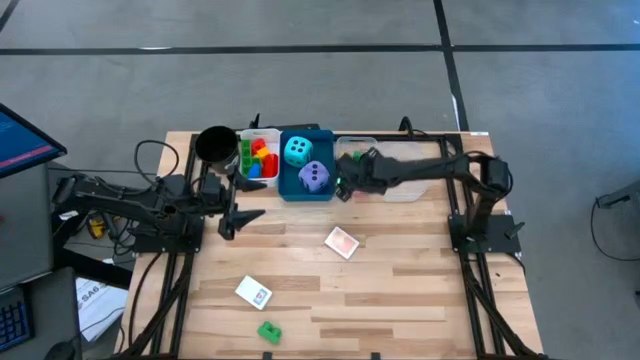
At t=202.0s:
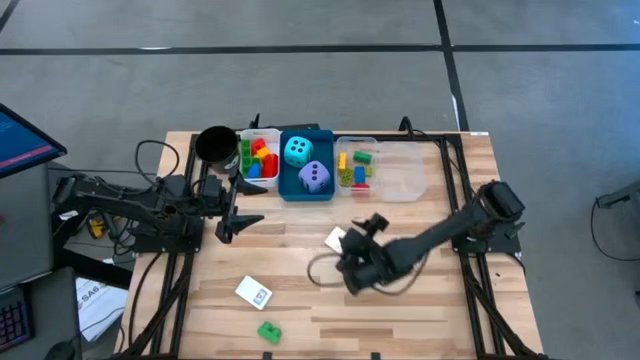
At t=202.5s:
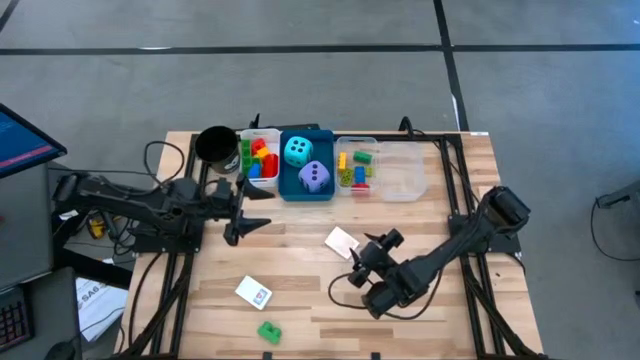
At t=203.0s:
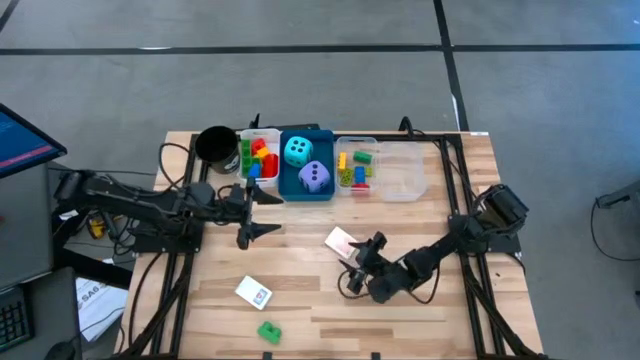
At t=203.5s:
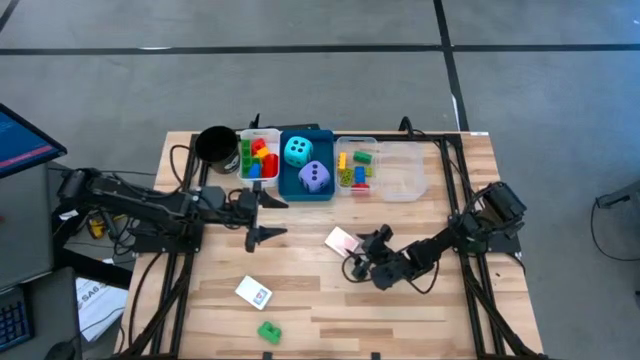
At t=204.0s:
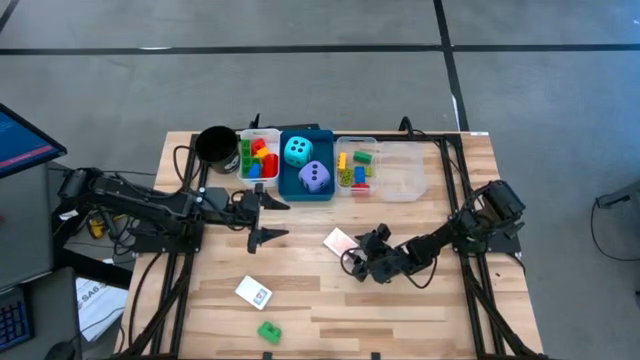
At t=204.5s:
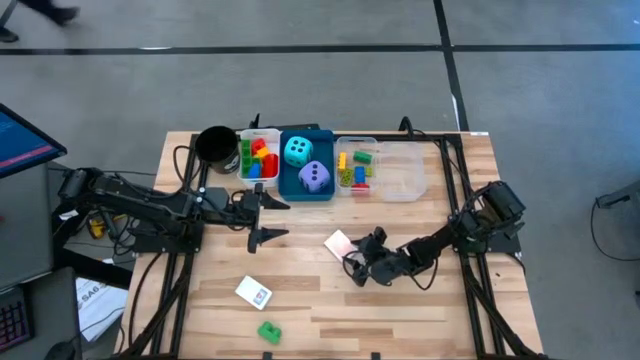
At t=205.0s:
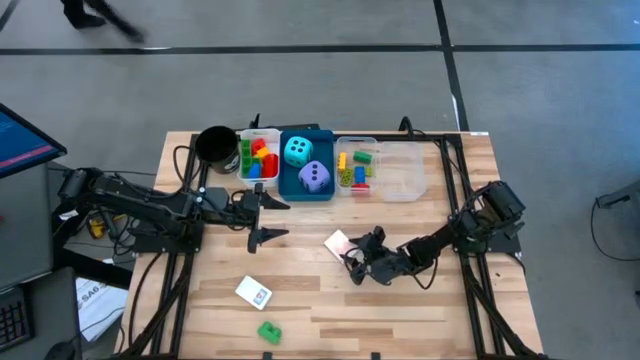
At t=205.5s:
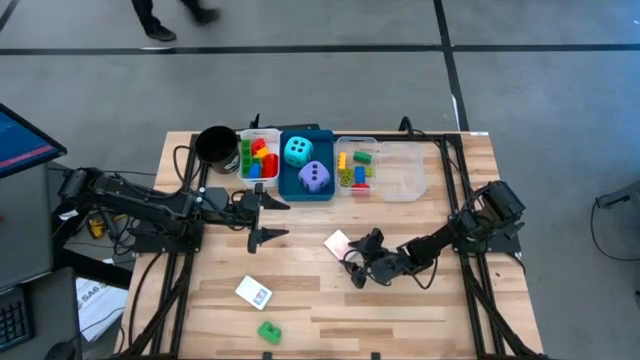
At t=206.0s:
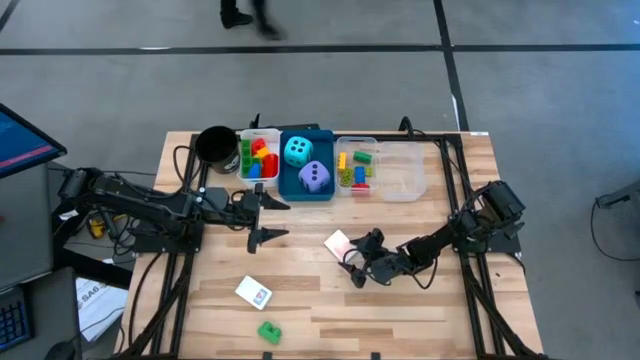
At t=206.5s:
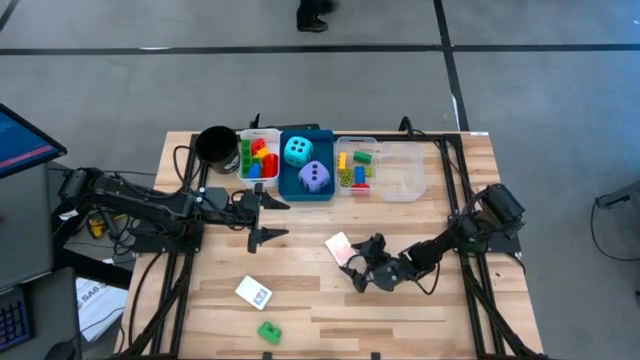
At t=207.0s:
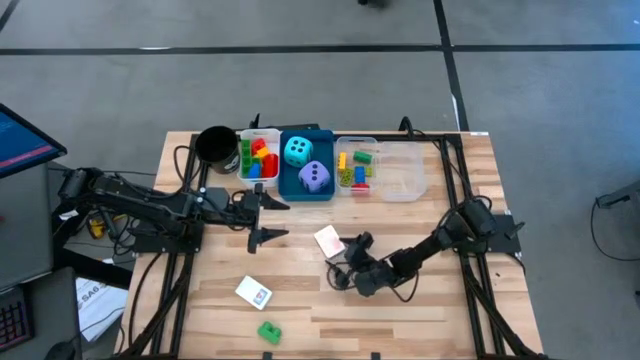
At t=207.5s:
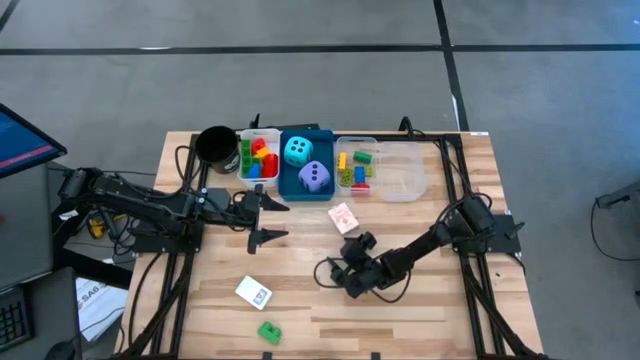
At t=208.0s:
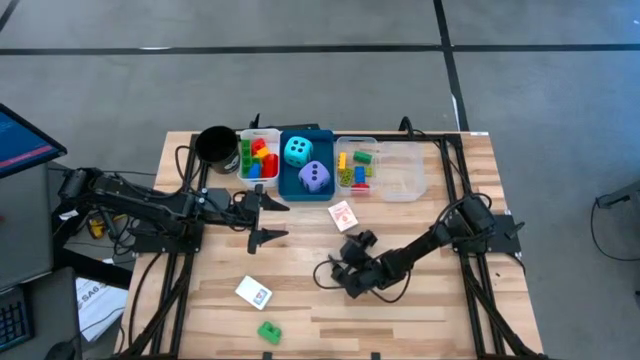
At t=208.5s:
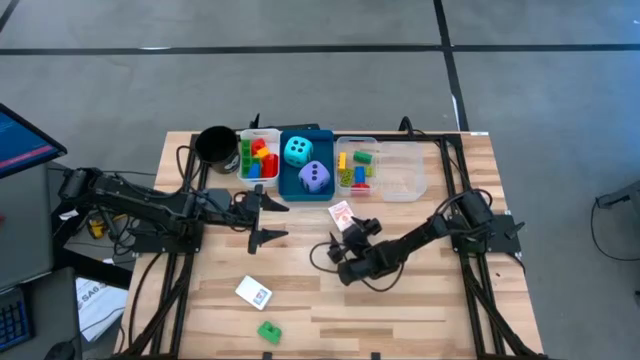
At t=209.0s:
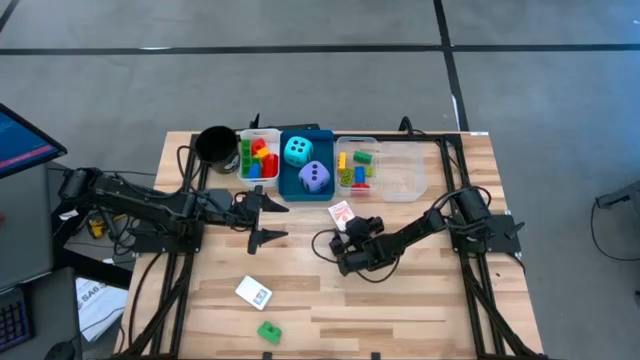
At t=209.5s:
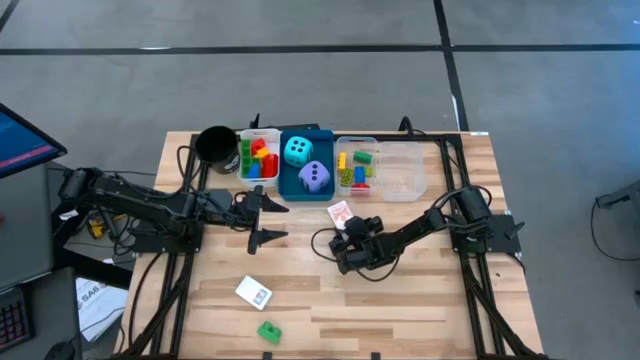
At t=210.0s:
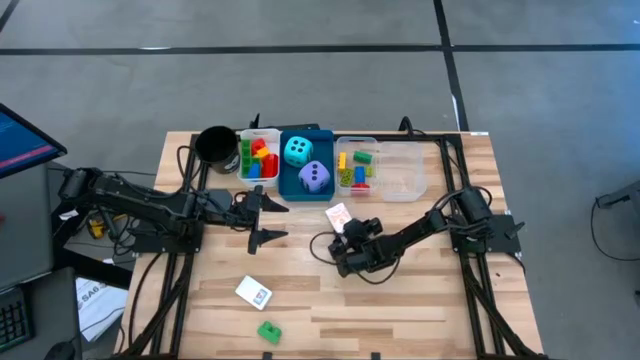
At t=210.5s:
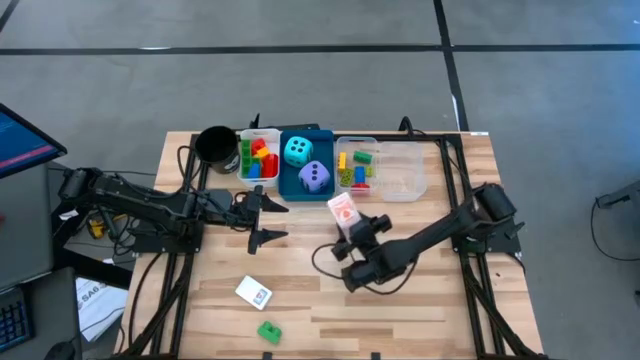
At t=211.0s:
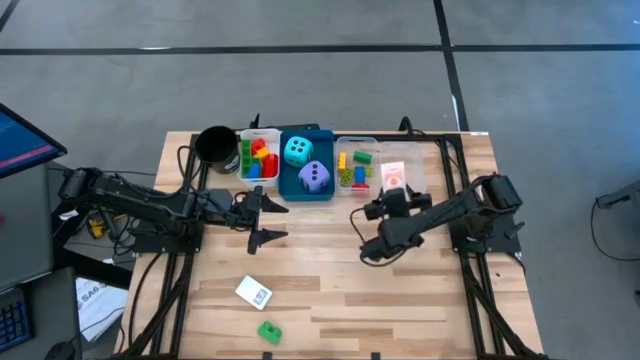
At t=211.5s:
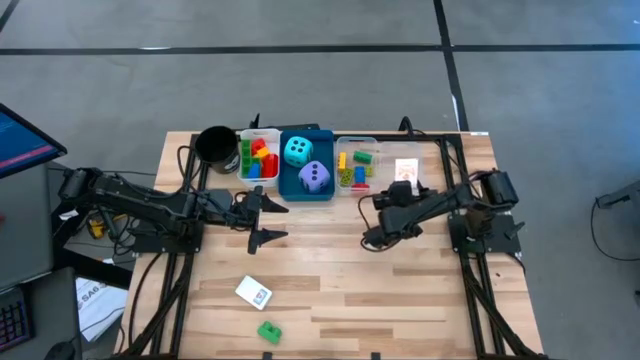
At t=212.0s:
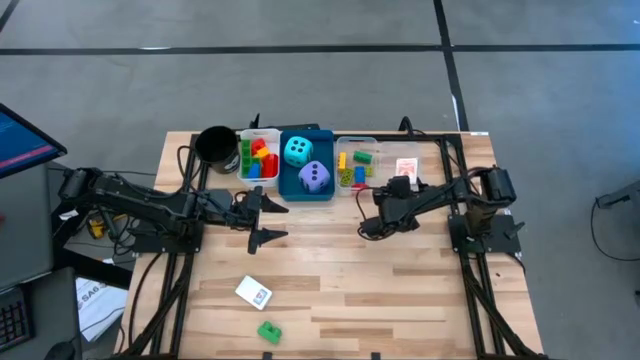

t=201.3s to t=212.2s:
Task: Pick & Place Toys
Put the orange deck of cards into the right transparent bin

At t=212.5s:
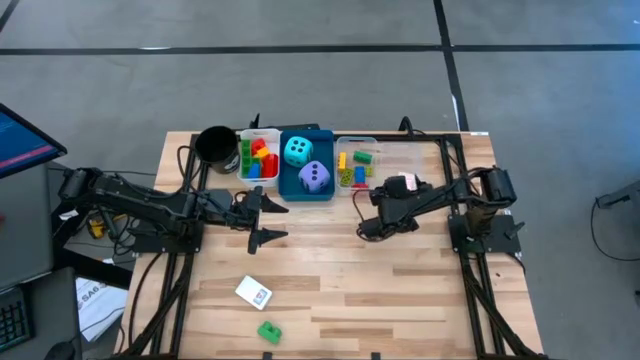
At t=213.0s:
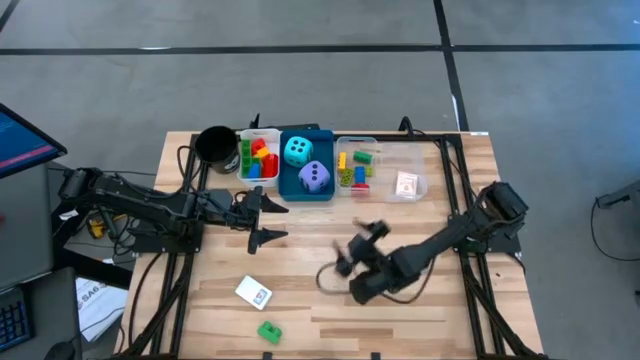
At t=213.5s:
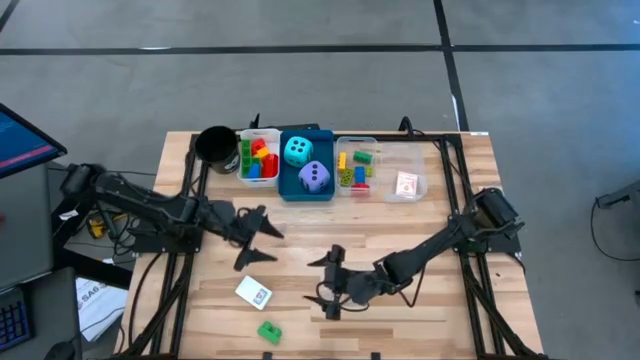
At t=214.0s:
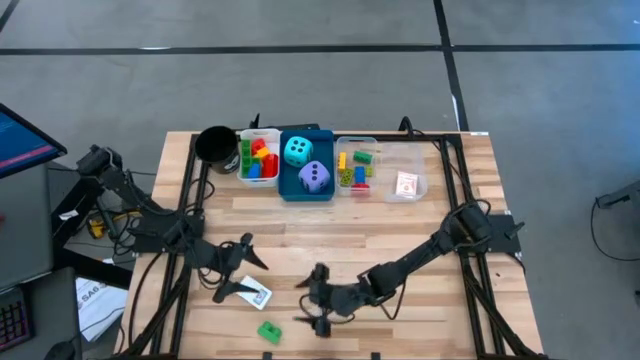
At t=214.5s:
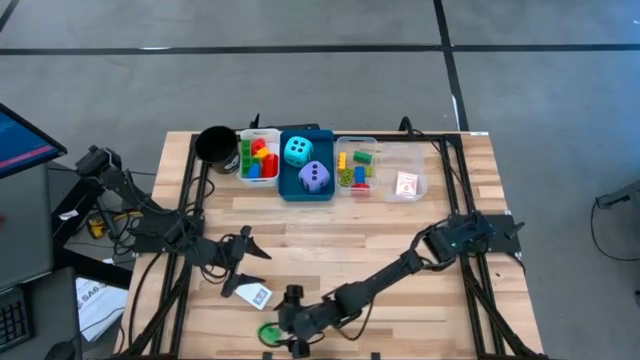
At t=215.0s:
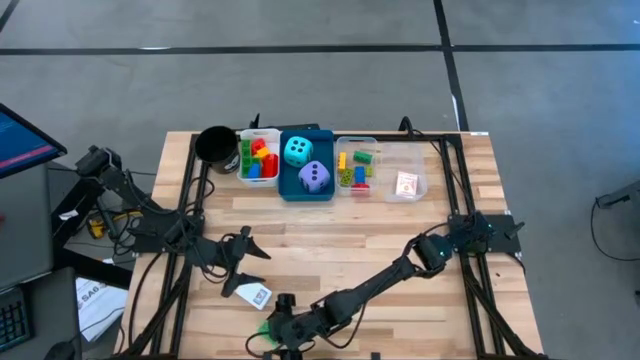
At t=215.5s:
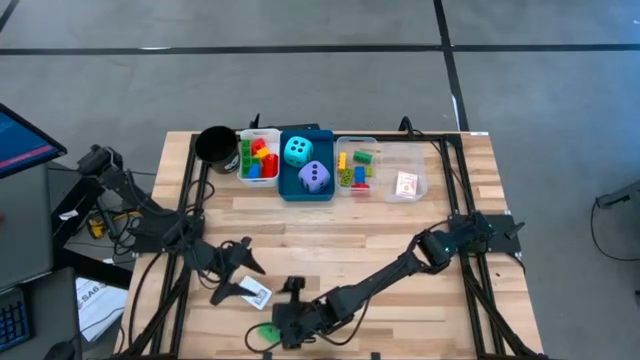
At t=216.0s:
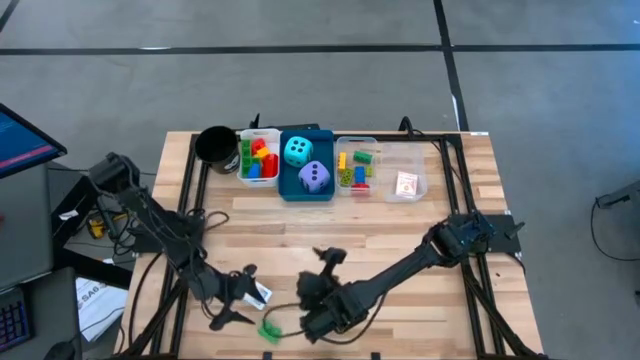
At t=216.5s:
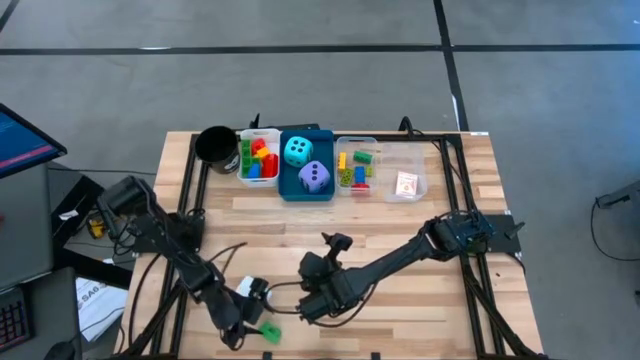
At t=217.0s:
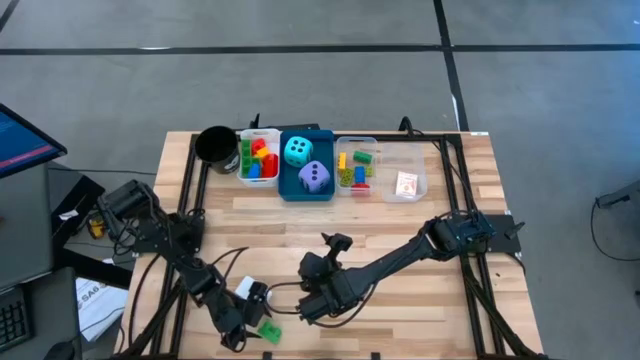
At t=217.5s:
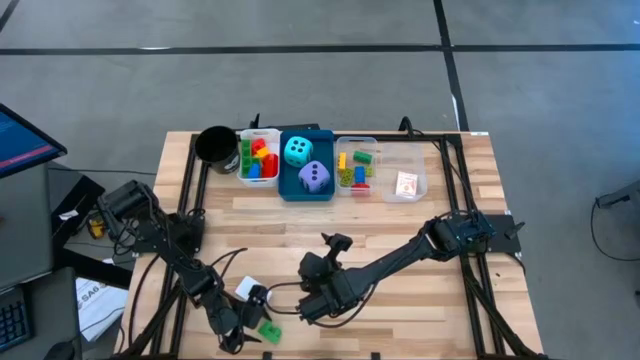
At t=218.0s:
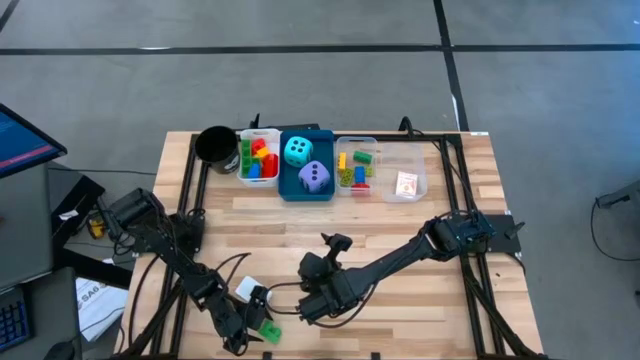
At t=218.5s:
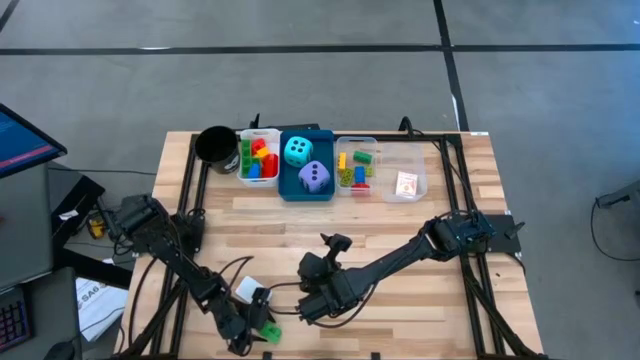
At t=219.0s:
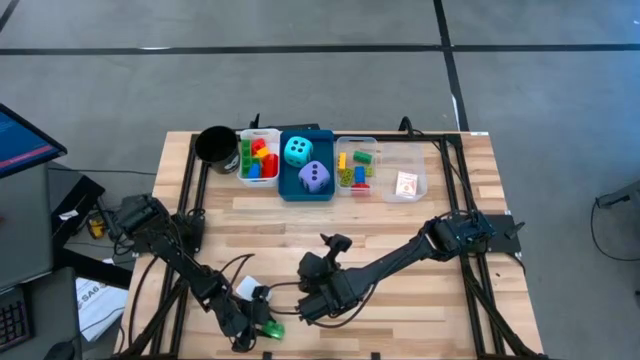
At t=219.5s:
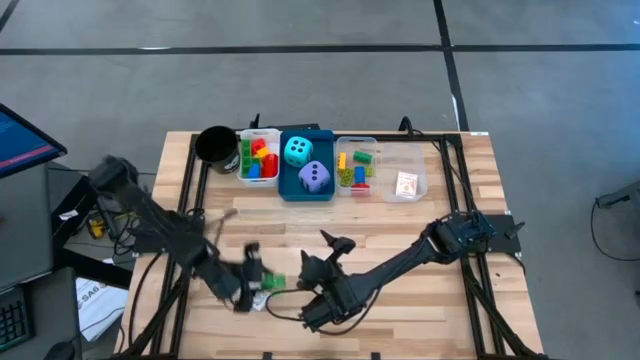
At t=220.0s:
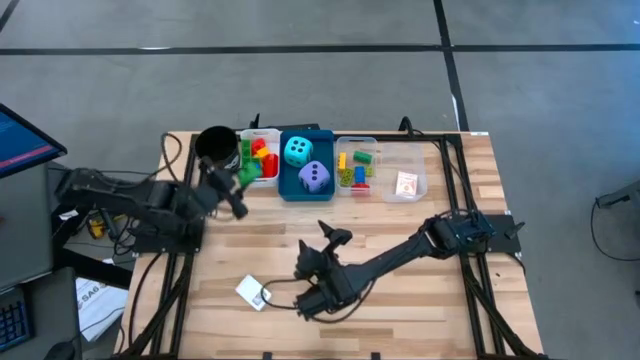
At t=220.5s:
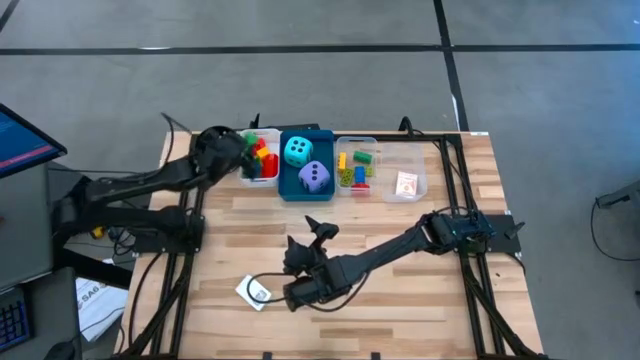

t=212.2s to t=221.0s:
Put the large green game piece into the white bin

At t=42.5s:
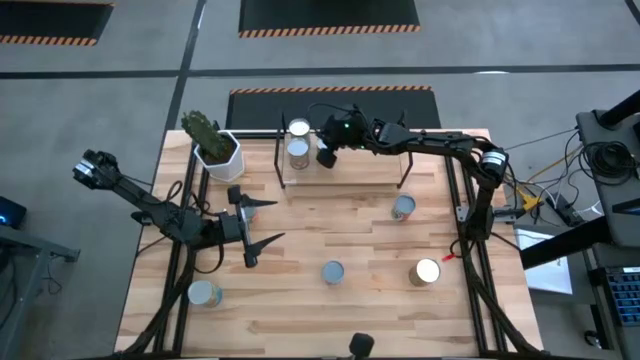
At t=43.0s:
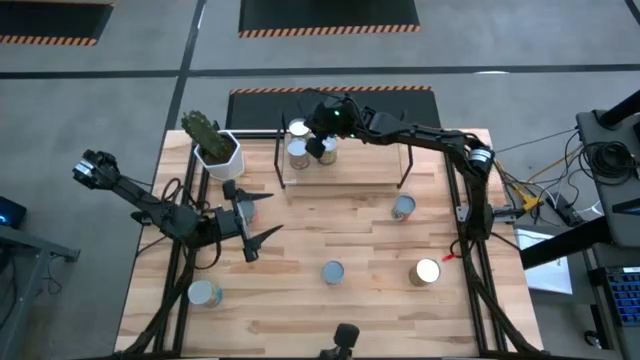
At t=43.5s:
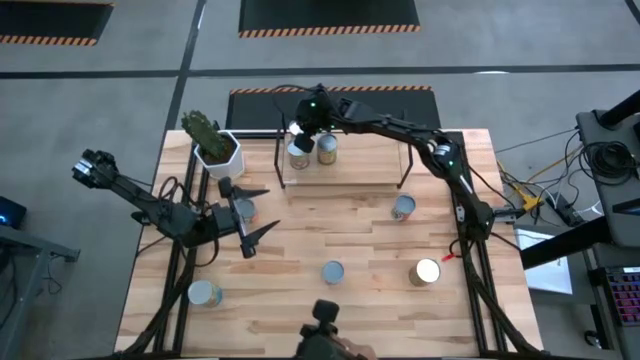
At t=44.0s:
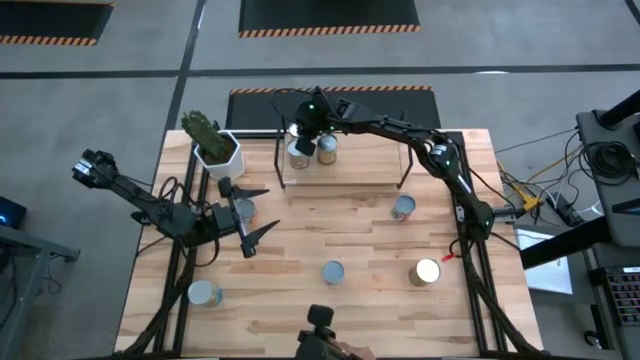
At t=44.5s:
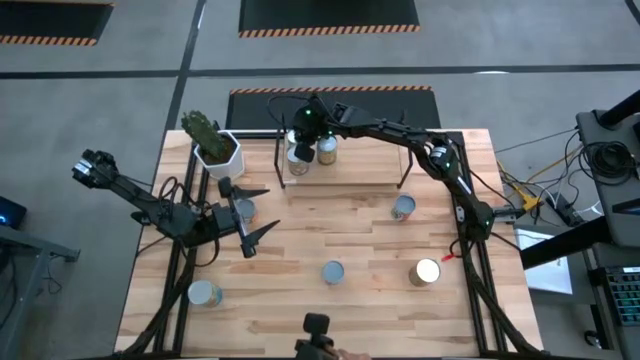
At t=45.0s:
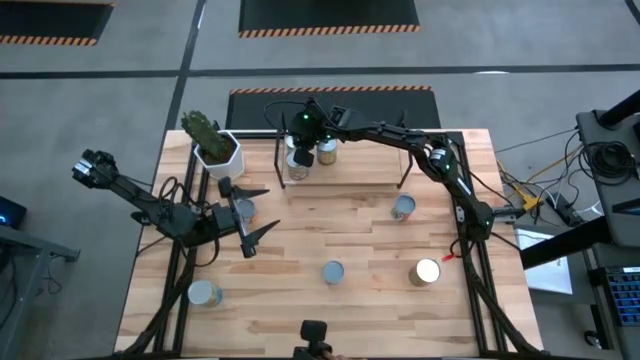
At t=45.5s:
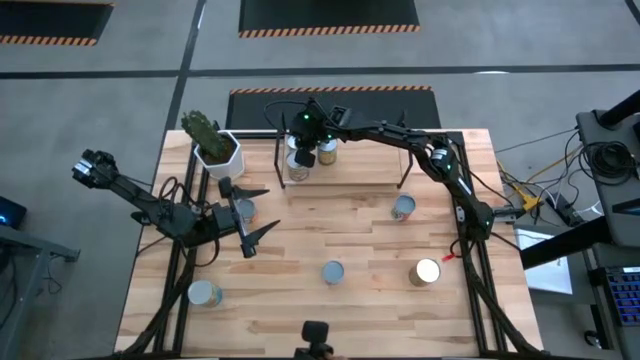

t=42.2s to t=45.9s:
Task: Pick and place cans onto a shelf
Adjust the canned cherries on the shelf
